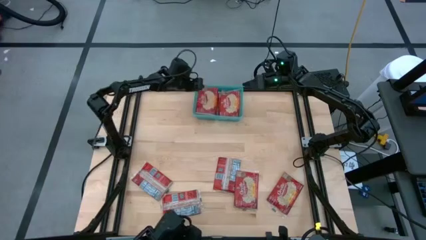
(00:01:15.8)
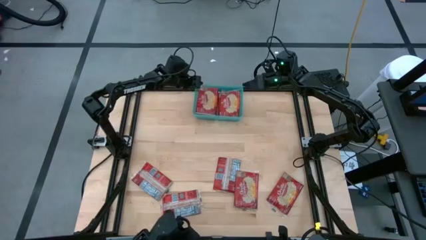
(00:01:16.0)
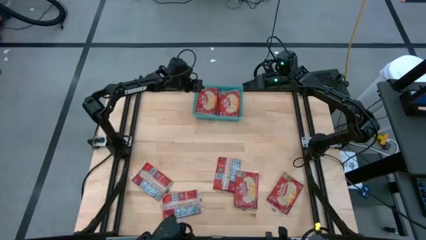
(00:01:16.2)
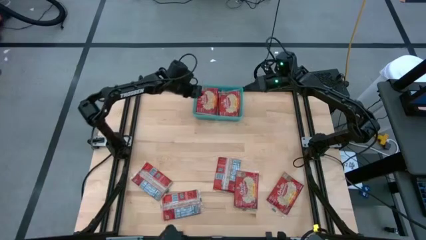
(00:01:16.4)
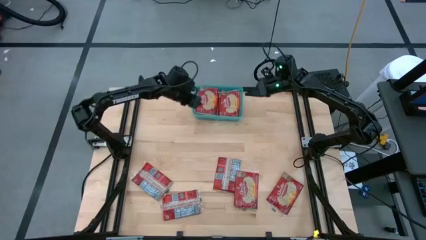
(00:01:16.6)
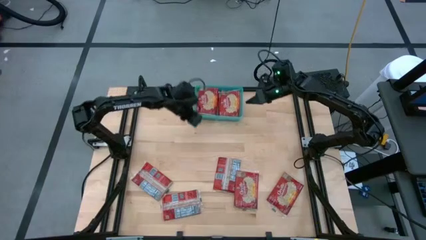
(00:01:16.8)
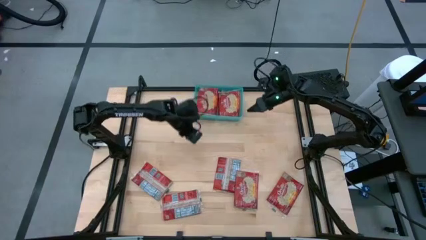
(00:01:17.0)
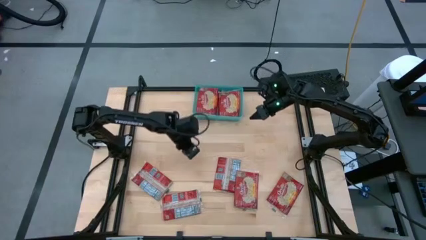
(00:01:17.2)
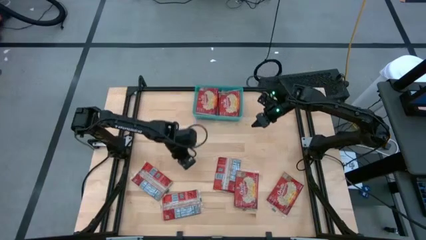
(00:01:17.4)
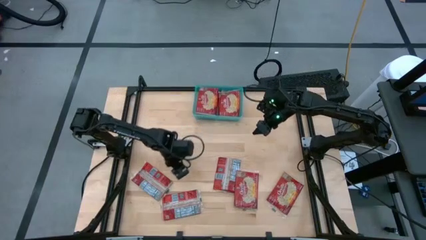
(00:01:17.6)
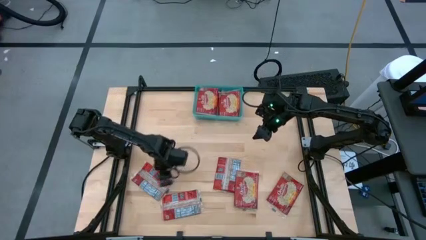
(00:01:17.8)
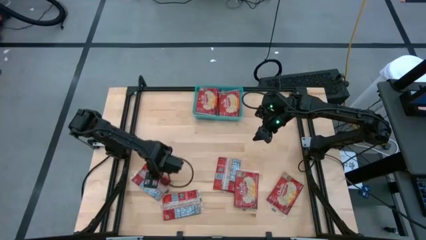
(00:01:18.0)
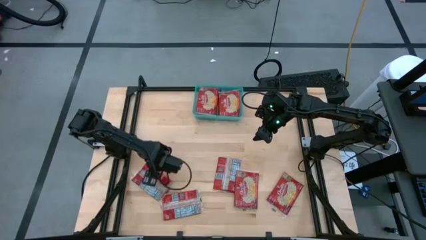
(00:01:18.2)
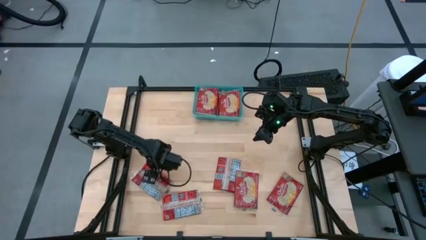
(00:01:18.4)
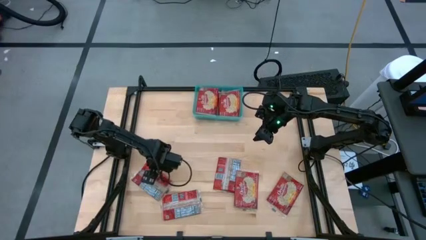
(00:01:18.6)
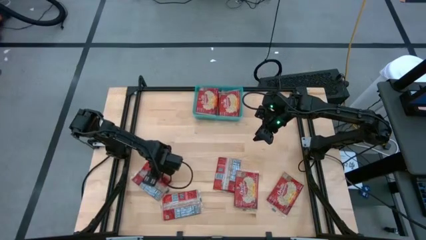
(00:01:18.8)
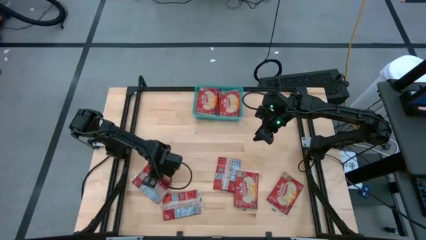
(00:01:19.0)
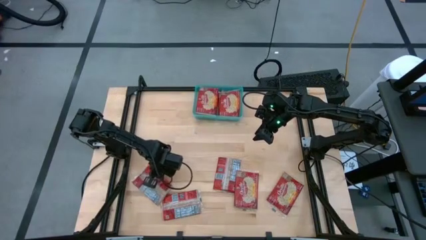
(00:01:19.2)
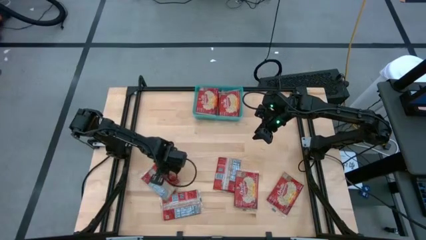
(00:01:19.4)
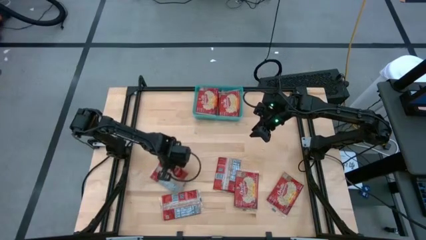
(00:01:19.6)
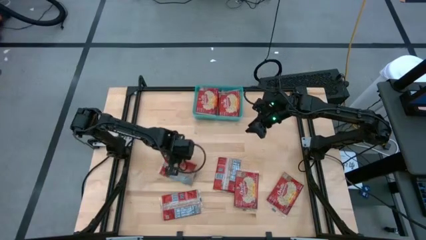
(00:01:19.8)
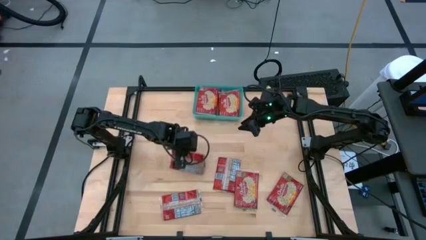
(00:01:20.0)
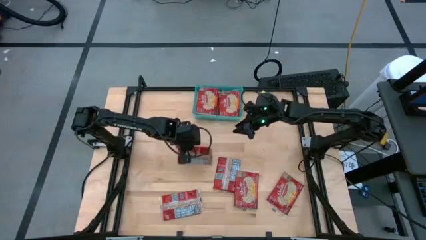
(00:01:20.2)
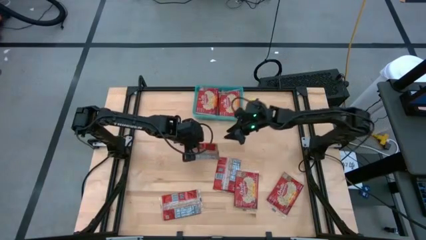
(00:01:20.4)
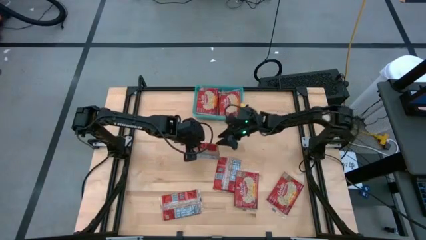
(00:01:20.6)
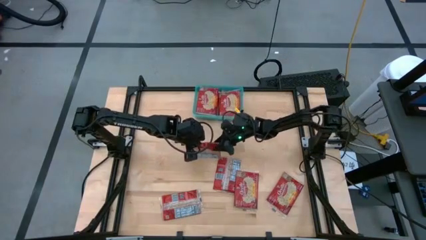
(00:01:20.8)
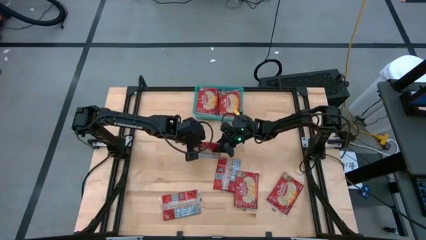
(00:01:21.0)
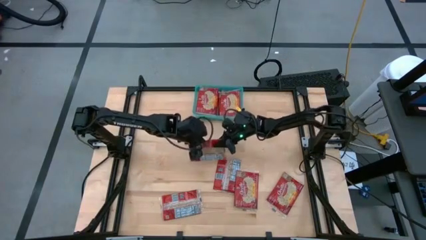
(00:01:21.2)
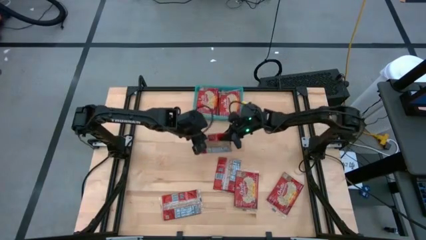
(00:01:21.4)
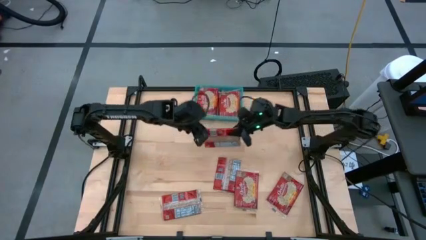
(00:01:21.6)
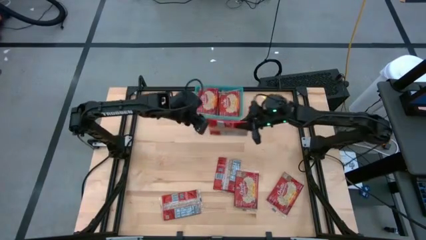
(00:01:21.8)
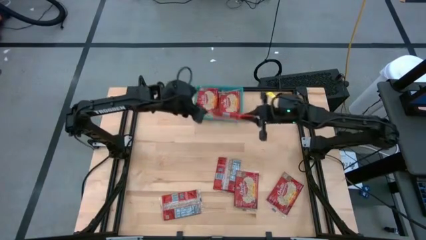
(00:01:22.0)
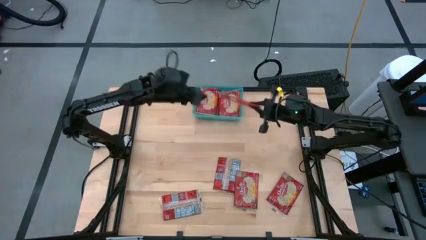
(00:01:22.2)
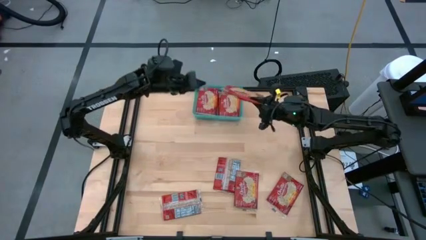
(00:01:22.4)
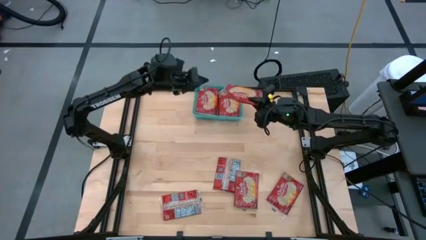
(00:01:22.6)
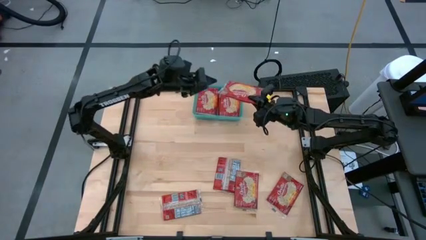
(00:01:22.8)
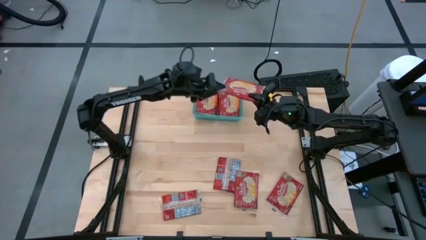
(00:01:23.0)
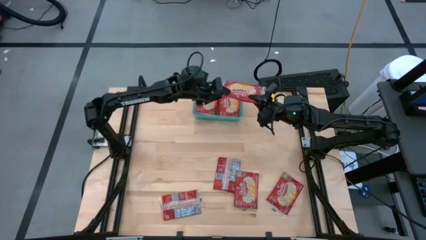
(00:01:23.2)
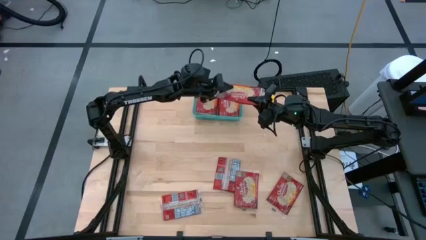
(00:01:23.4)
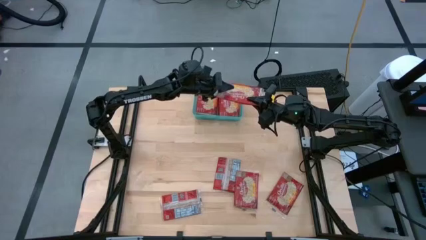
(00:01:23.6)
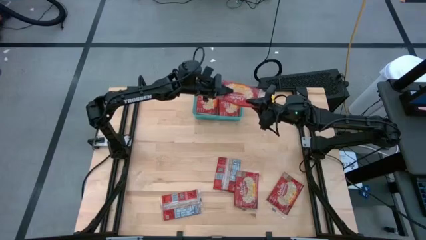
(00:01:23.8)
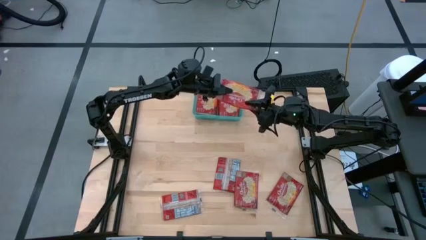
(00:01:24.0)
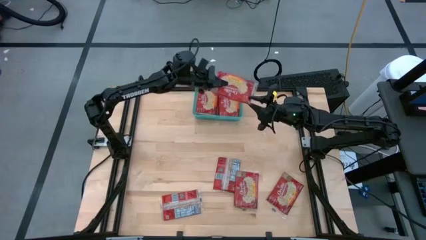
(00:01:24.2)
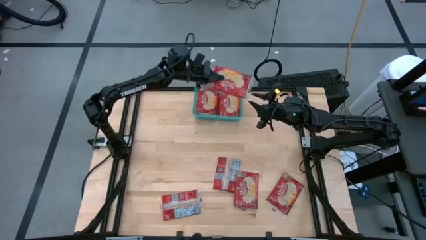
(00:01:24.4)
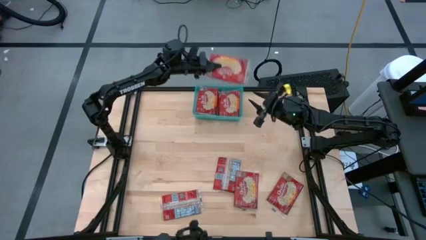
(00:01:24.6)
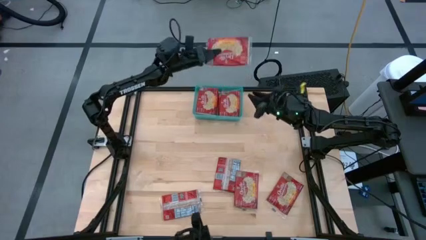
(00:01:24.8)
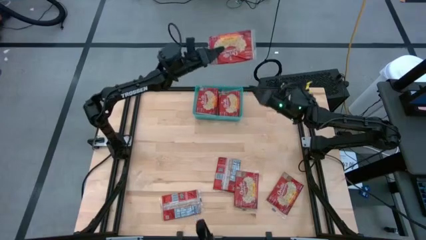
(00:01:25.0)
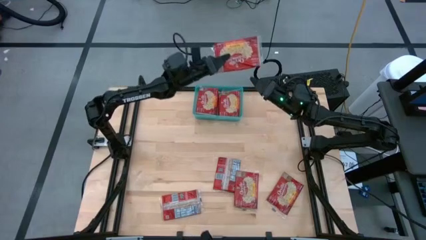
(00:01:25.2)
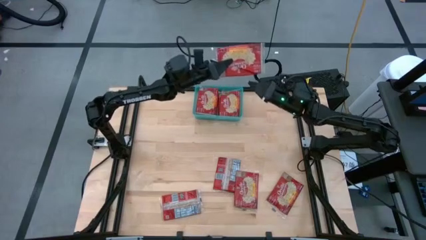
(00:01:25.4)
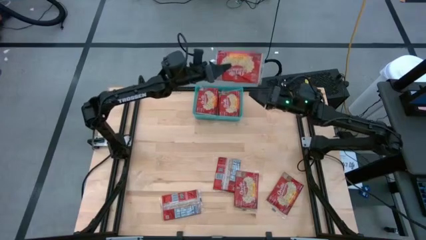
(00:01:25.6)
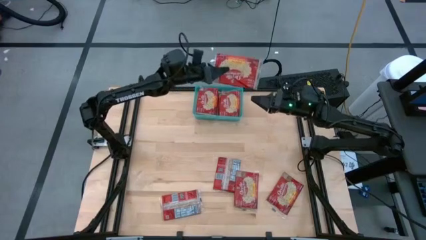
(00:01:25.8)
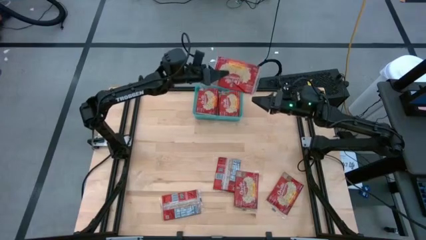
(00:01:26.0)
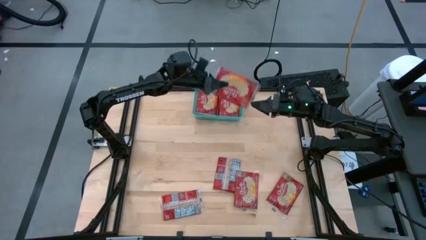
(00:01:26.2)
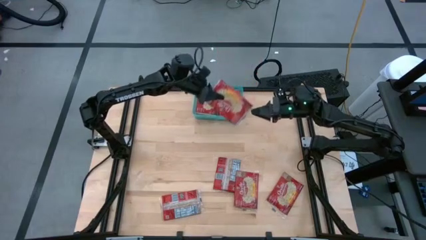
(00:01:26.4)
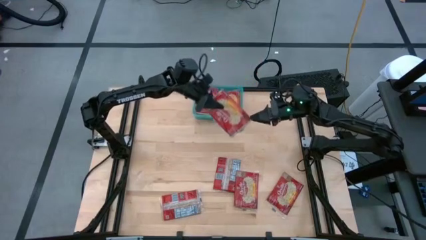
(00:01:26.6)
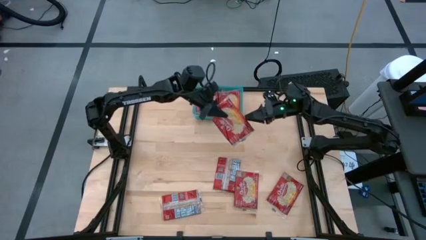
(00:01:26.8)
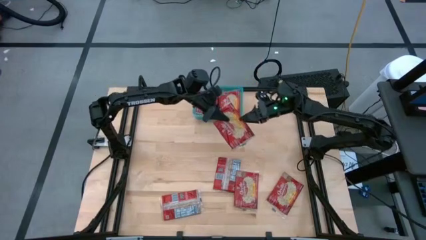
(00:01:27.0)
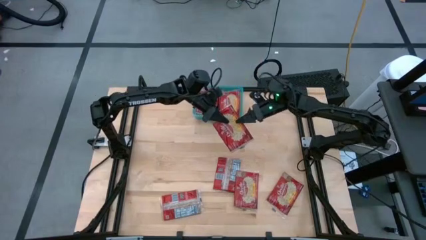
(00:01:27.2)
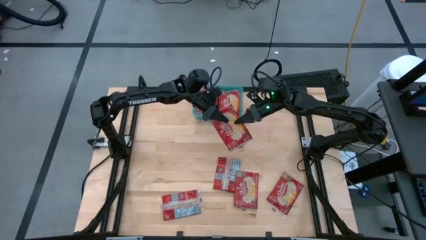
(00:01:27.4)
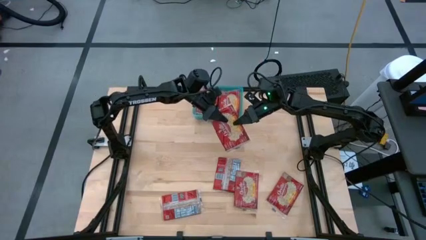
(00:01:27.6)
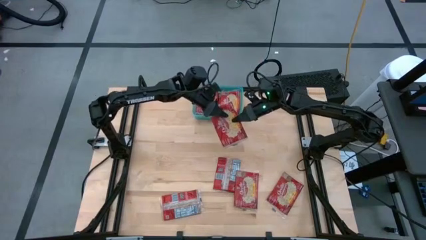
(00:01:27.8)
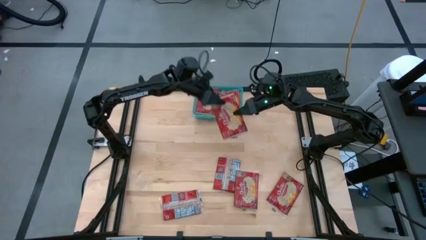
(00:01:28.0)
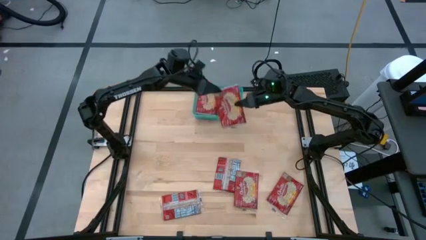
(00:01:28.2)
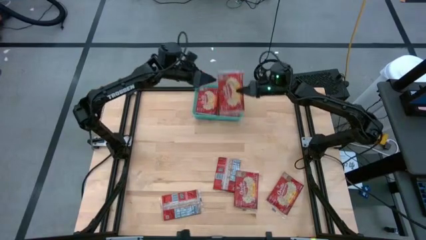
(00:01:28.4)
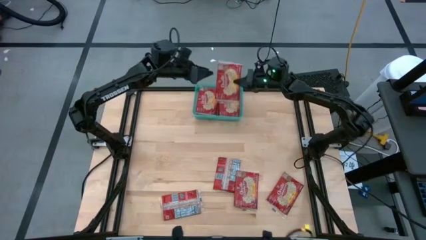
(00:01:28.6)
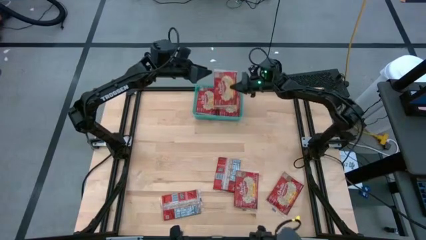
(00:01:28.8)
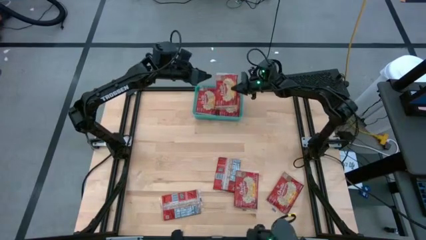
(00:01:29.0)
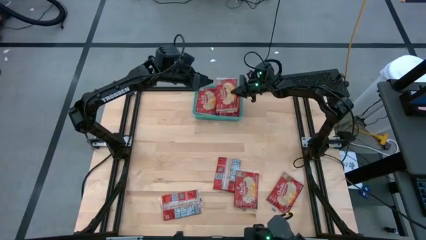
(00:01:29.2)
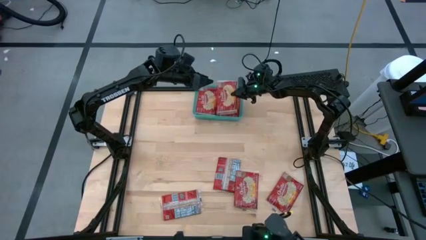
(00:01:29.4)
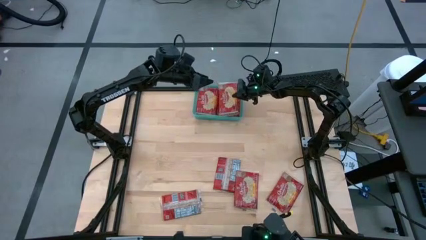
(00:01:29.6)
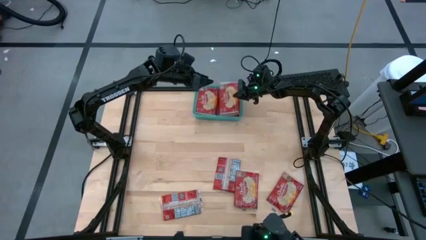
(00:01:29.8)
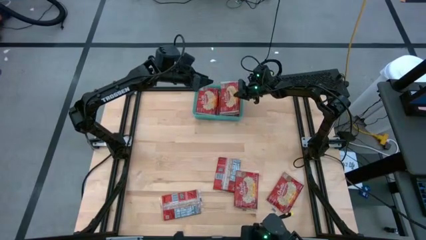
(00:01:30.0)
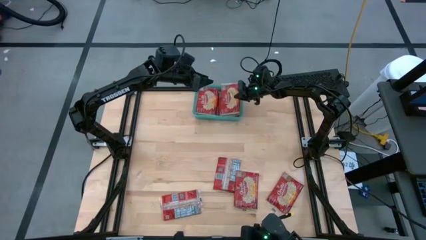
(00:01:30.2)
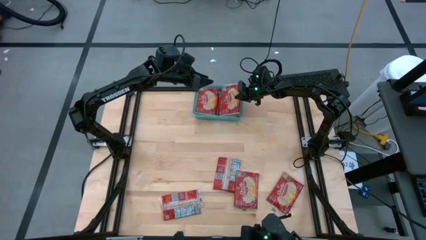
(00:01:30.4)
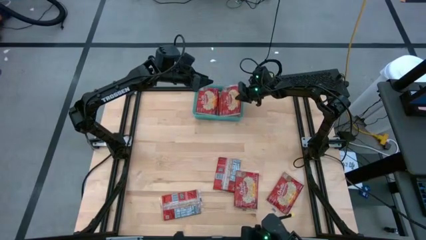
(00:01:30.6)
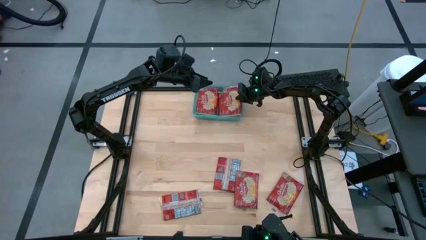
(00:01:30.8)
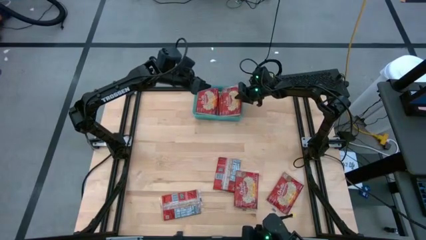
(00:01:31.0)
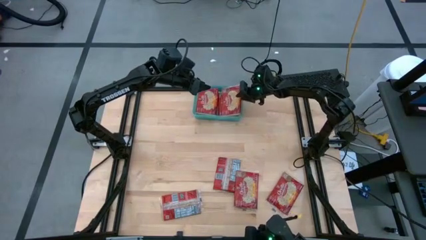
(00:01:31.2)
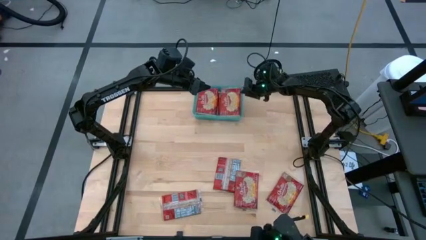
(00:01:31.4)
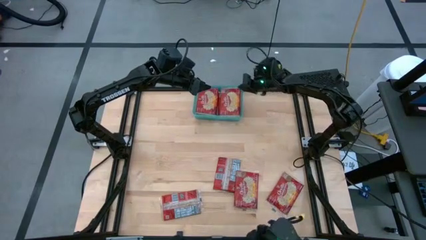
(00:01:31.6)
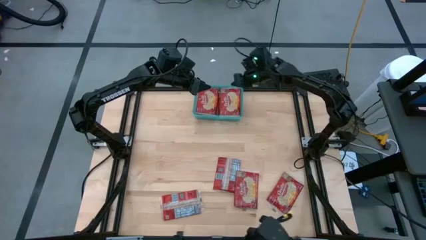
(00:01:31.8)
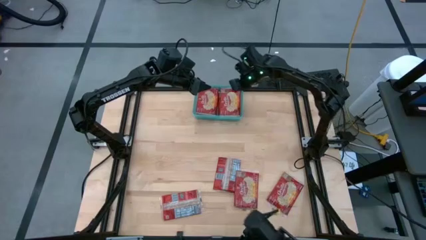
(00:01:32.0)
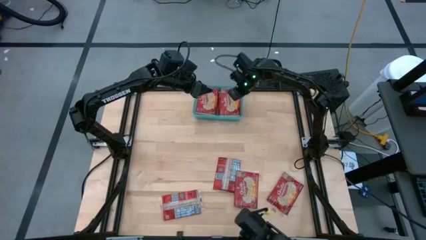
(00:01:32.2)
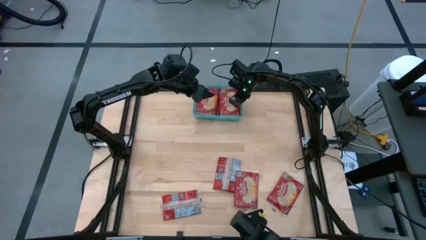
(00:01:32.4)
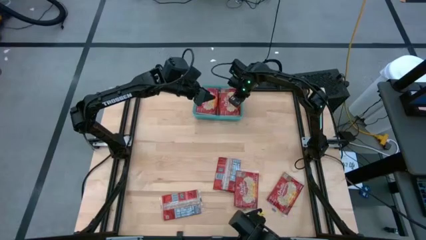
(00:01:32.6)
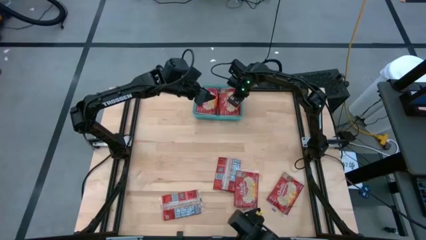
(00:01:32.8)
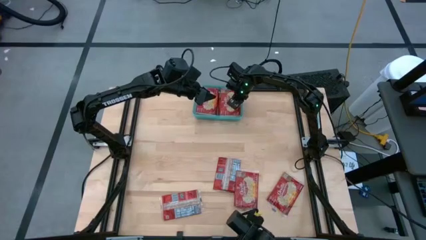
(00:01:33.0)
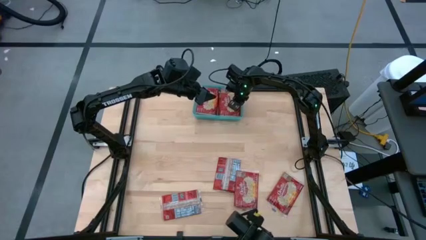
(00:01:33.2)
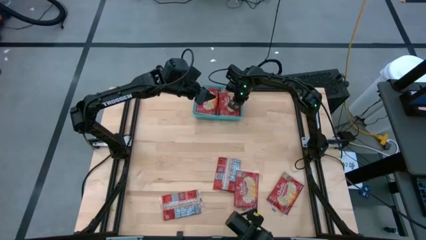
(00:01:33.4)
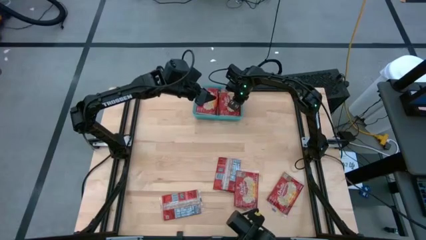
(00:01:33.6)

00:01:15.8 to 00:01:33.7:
Task: Sort popcorn bags into baskets
Put the red popcorn bag into the blue bin
